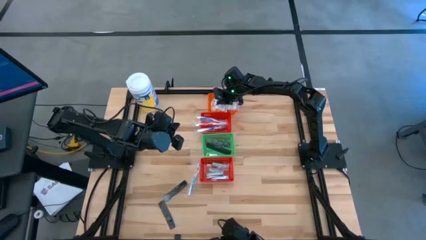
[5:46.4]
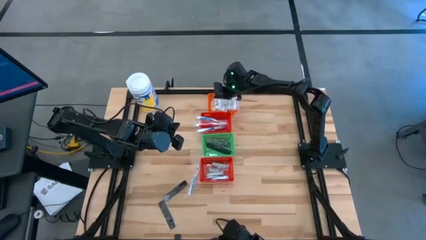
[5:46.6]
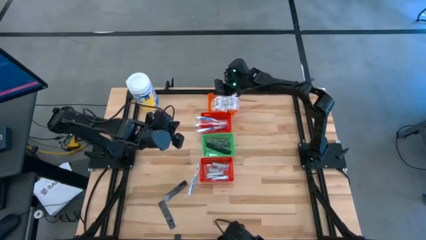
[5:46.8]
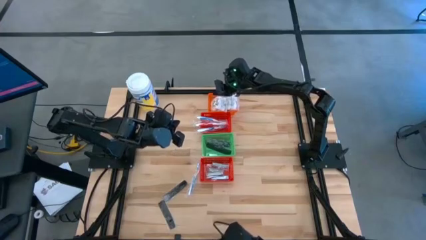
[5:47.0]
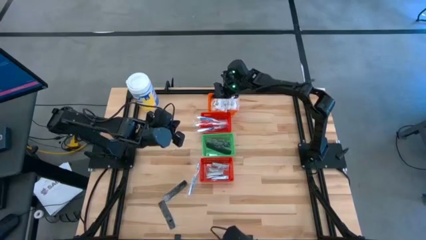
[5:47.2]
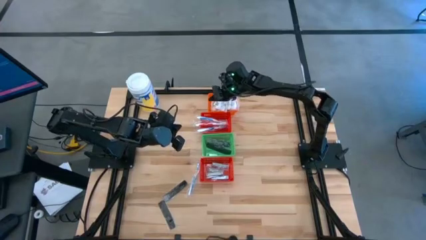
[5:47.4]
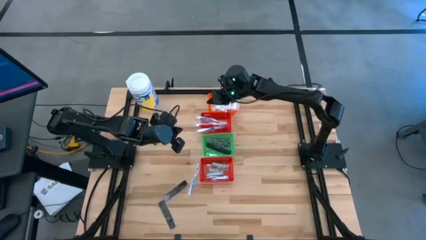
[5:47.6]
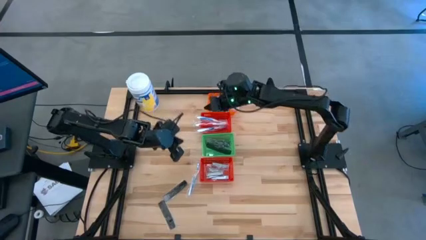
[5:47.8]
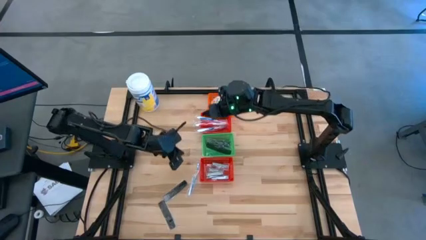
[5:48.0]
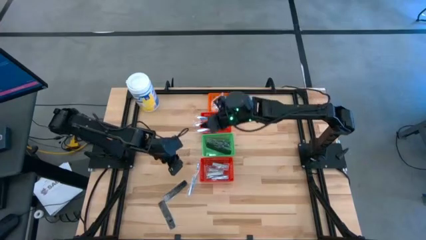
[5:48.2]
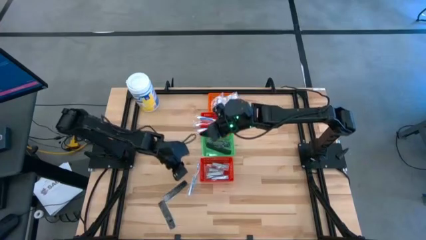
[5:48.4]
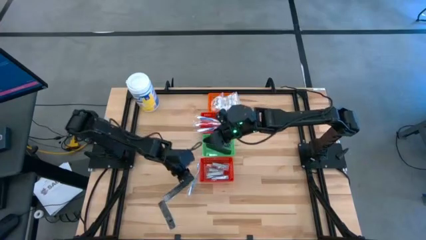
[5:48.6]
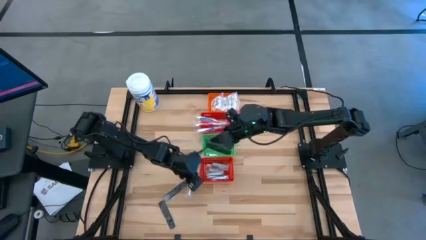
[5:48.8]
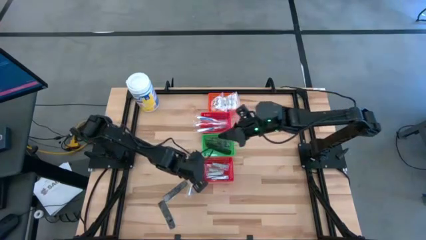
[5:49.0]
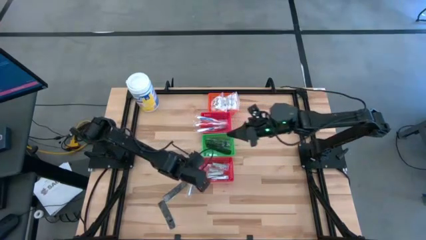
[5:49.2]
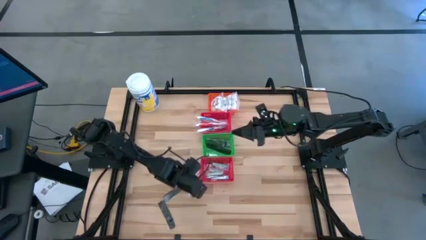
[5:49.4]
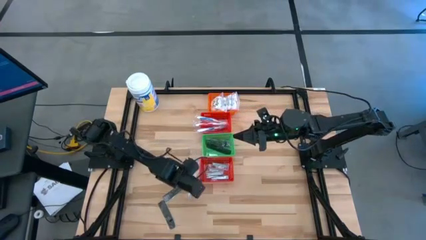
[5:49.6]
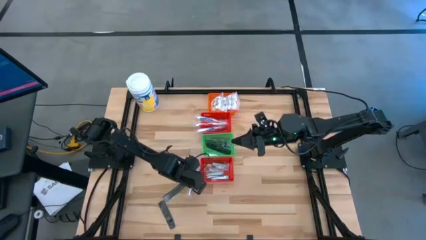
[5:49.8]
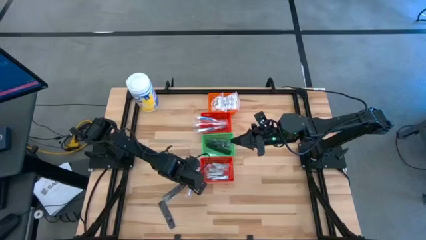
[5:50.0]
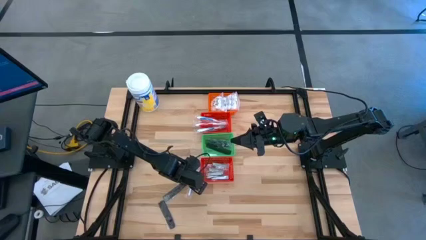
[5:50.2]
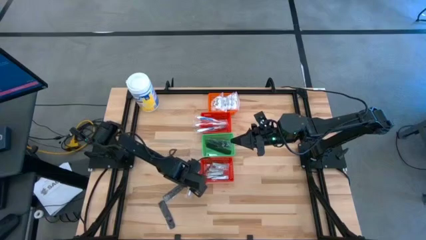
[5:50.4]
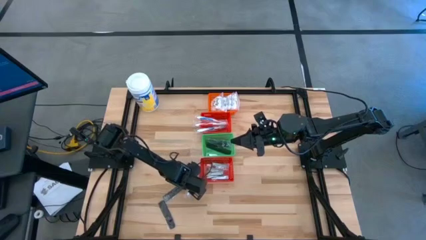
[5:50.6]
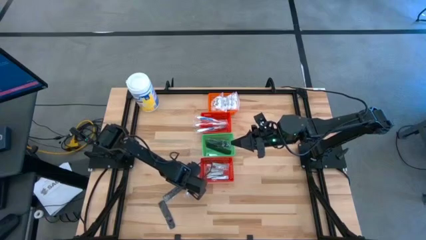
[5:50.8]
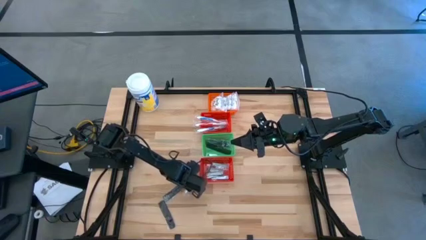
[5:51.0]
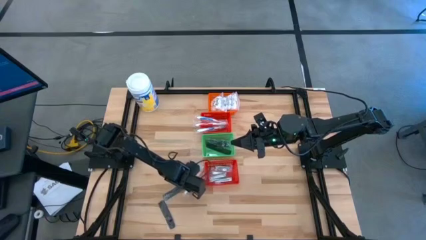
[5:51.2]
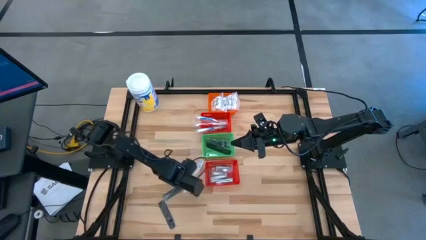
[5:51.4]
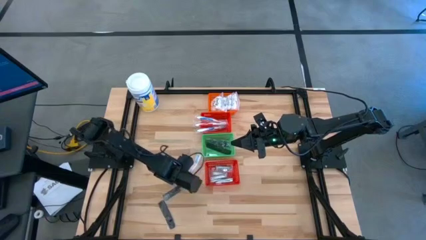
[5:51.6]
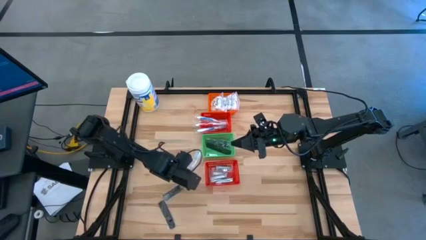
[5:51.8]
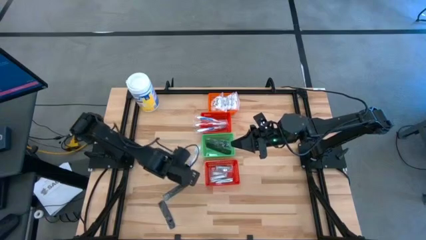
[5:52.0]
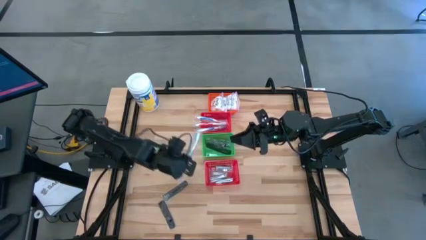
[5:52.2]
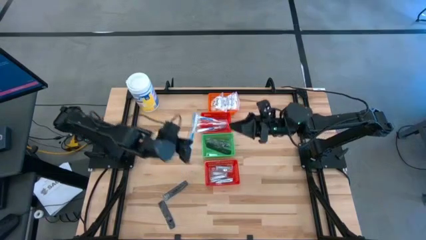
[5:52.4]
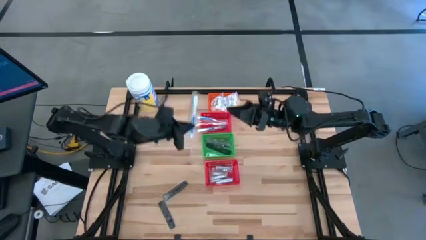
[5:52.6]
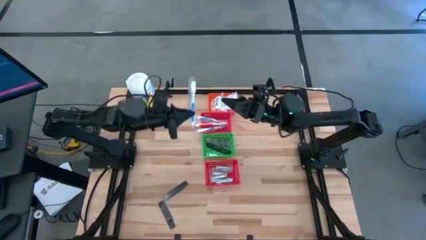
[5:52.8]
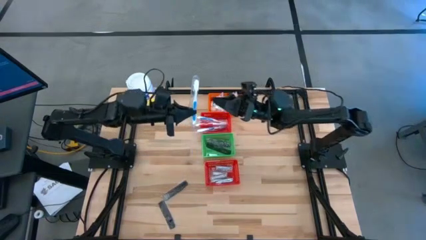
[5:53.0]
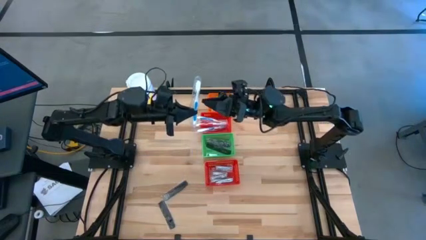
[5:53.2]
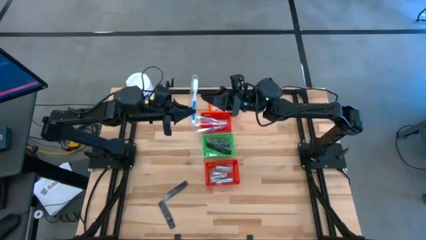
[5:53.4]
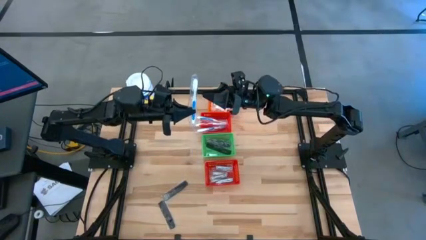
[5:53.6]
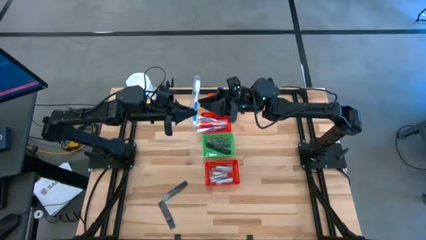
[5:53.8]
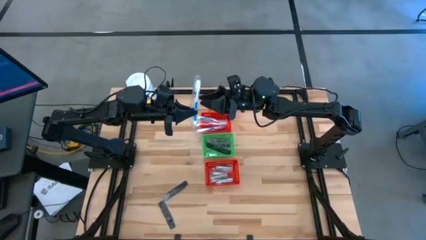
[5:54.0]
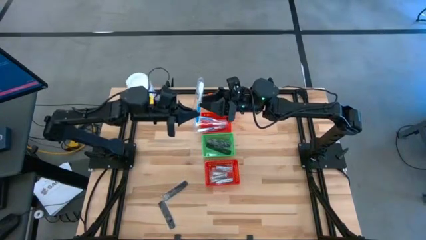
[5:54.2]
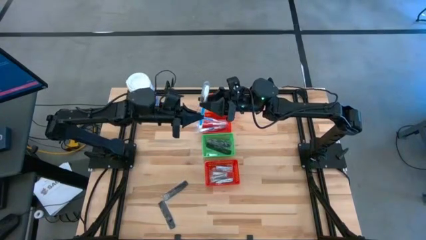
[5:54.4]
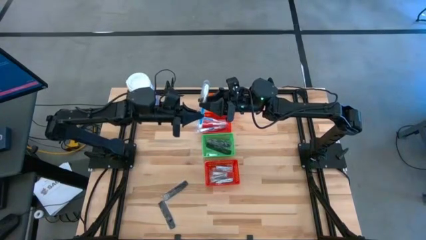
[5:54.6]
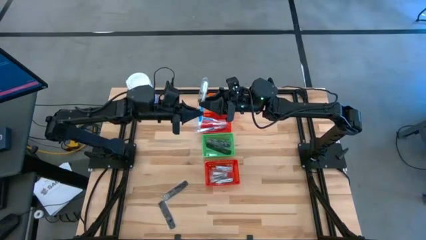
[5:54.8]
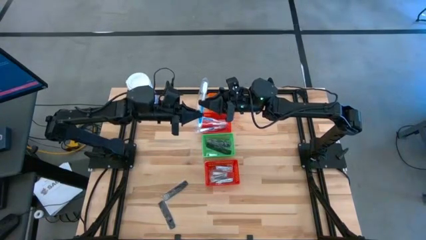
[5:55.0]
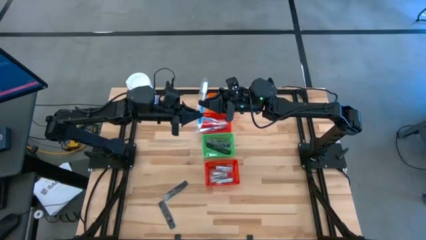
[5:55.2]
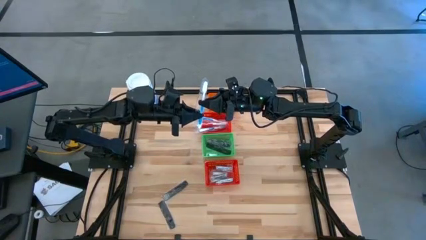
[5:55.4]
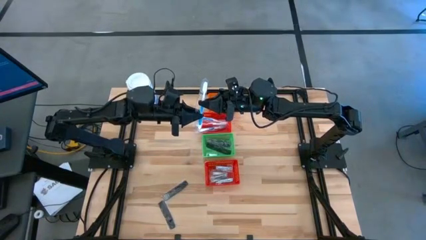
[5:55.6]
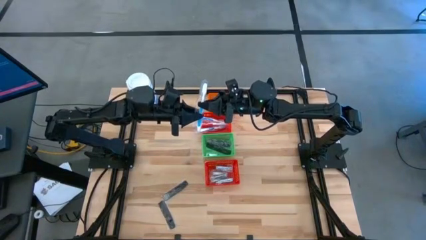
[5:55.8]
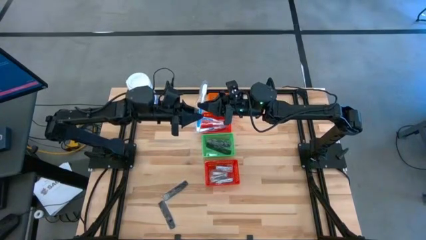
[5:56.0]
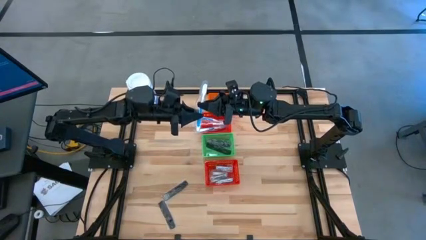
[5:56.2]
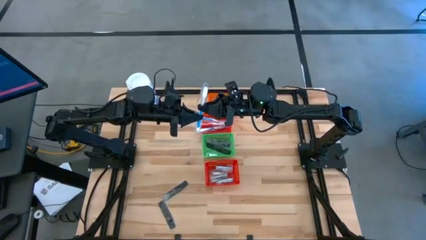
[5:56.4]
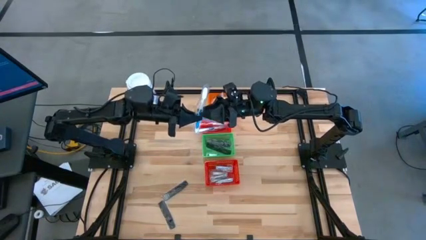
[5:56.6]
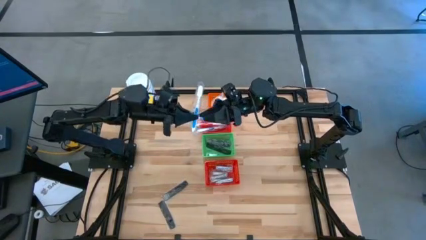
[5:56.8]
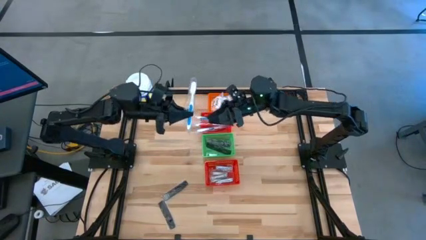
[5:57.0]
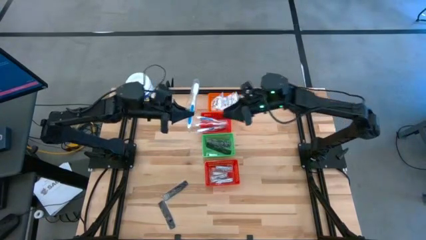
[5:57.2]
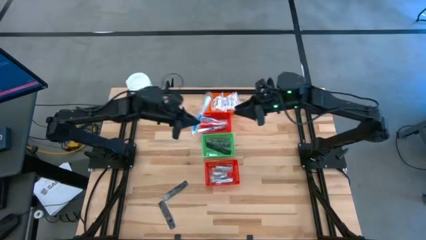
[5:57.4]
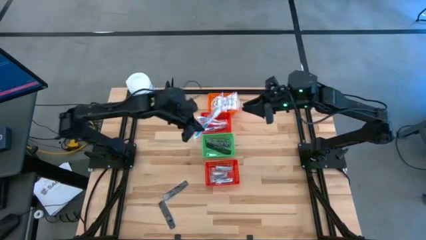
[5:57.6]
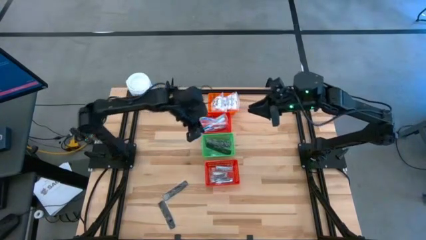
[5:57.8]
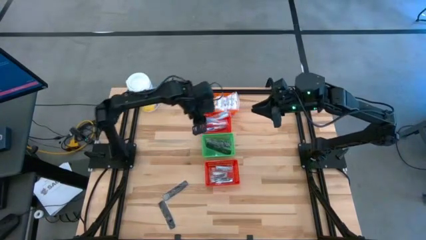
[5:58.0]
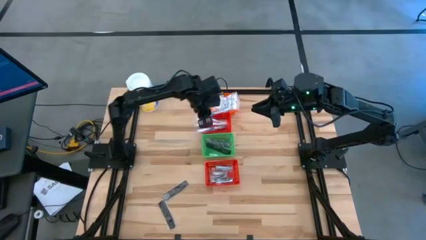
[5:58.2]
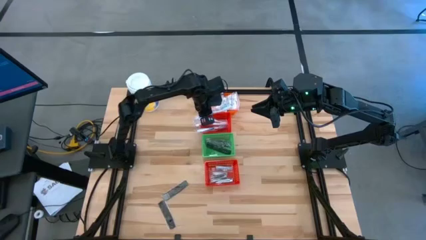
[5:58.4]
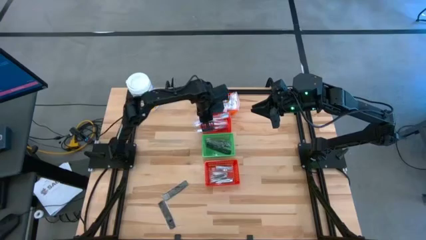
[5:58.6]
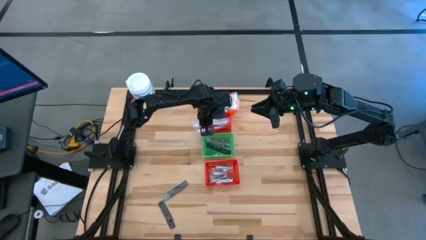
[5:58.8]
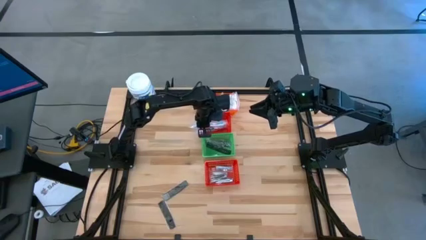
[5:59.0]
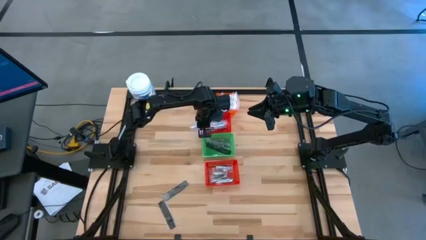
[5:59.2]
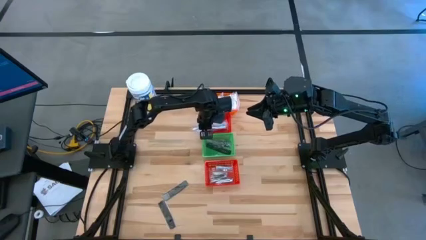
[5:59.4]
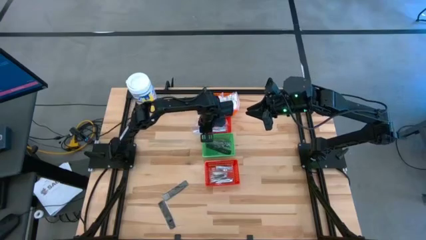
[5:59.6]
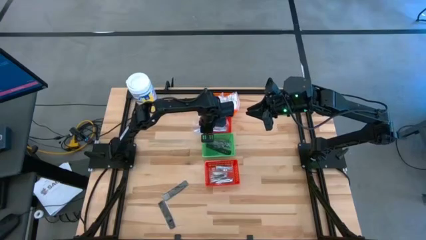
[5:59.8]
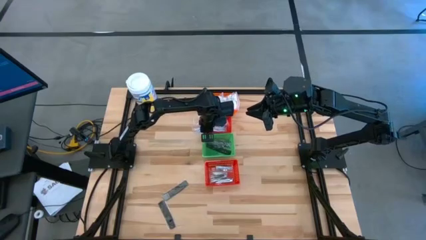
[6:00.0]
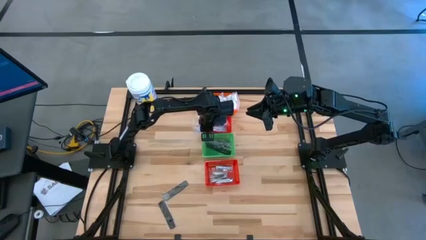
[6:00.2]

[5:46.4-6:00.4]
Task: Pick & Place Travel size toiletries
Put the blue toothbrush into the top red basket
